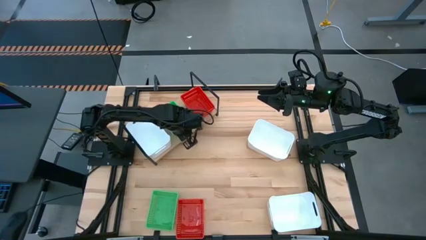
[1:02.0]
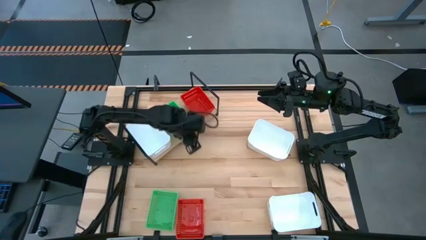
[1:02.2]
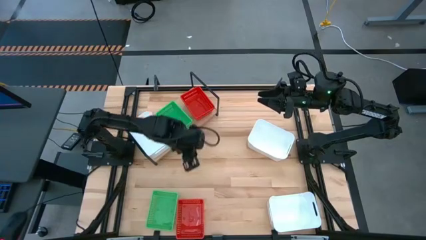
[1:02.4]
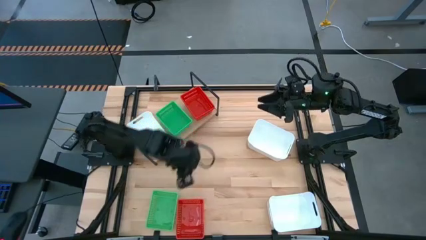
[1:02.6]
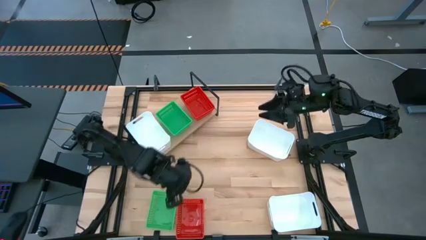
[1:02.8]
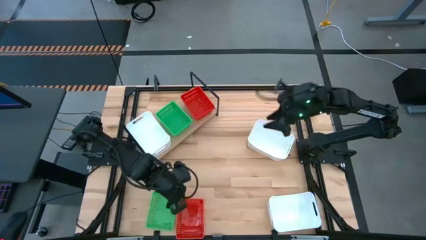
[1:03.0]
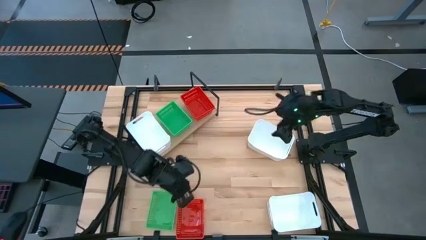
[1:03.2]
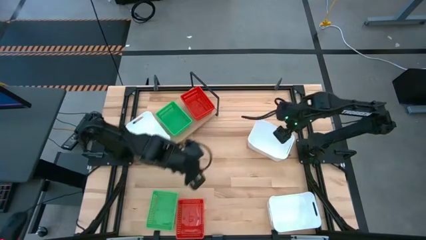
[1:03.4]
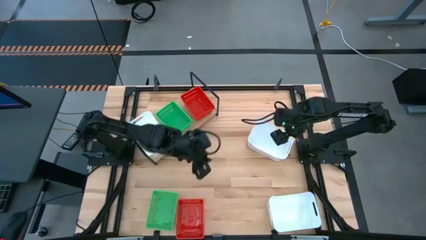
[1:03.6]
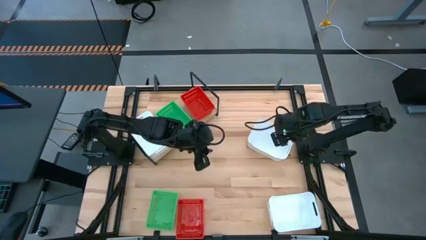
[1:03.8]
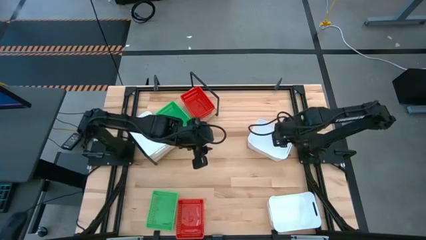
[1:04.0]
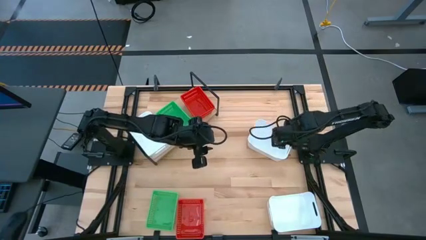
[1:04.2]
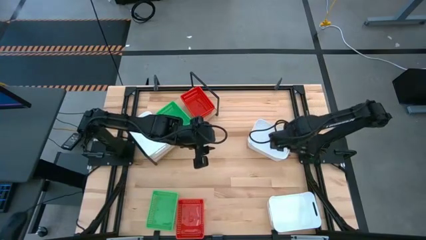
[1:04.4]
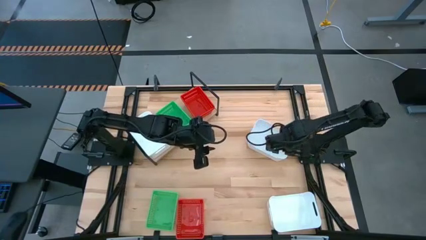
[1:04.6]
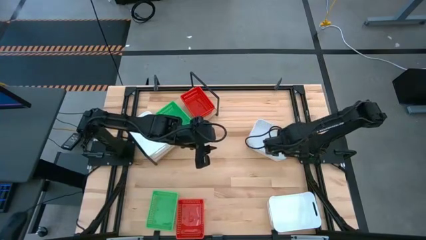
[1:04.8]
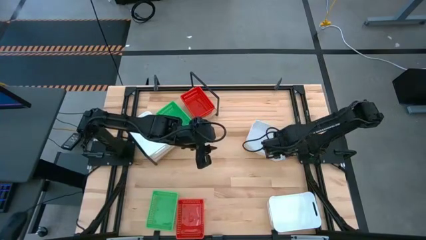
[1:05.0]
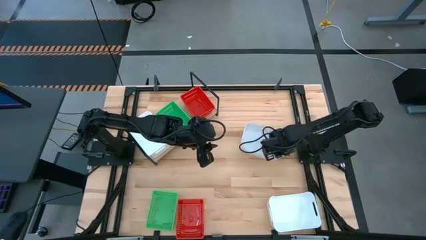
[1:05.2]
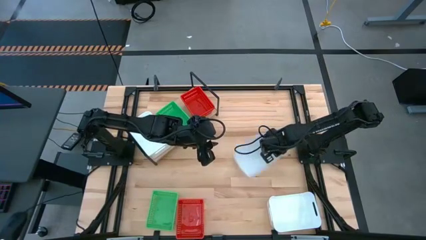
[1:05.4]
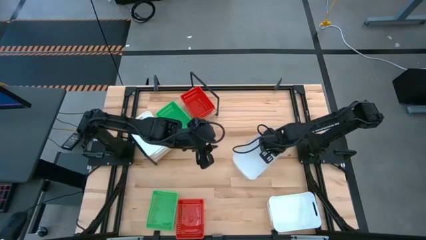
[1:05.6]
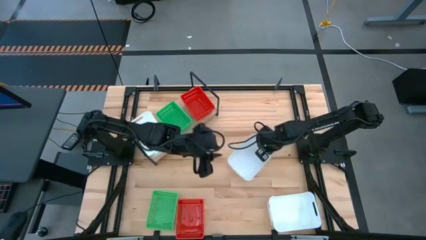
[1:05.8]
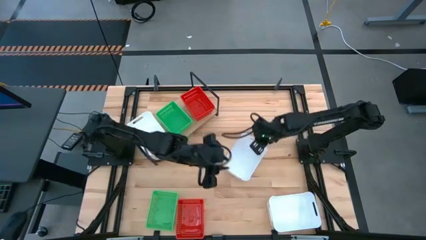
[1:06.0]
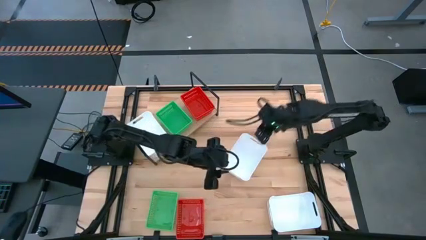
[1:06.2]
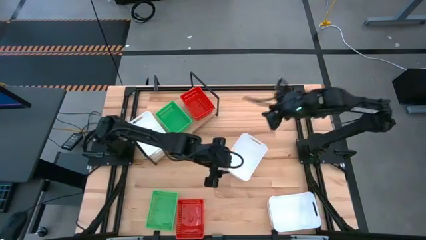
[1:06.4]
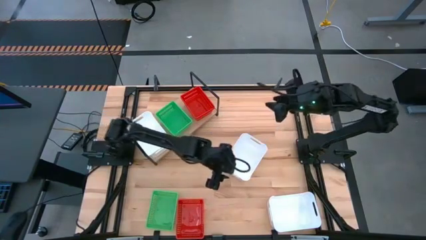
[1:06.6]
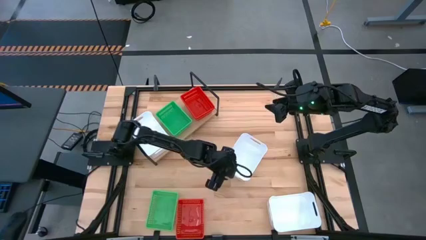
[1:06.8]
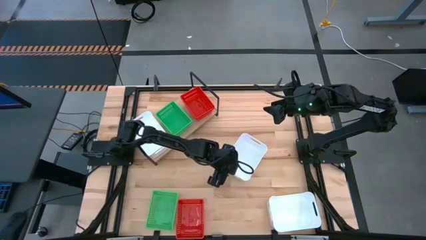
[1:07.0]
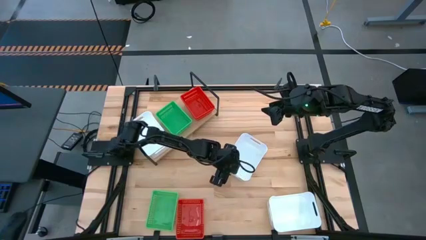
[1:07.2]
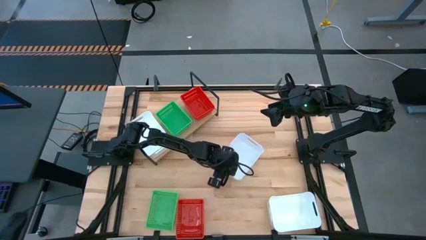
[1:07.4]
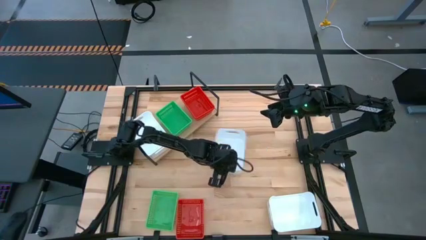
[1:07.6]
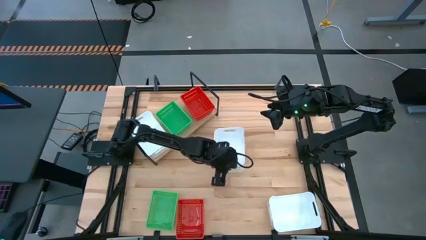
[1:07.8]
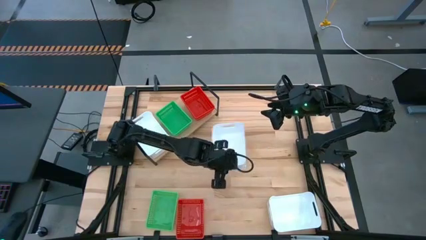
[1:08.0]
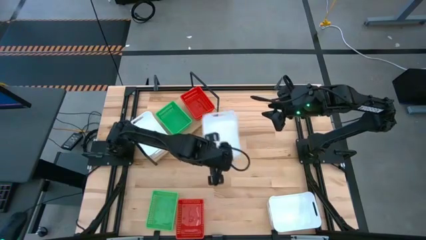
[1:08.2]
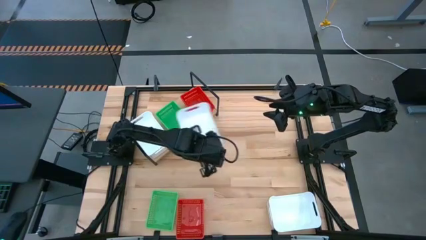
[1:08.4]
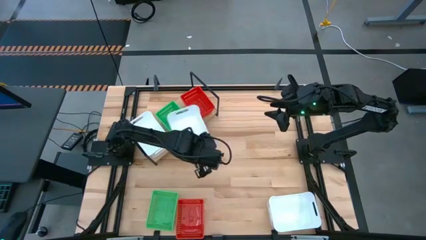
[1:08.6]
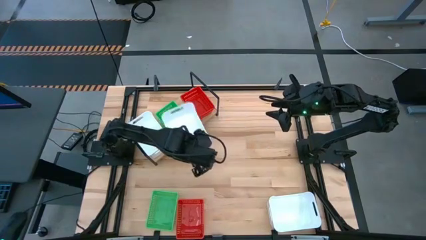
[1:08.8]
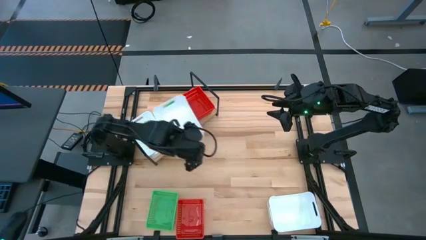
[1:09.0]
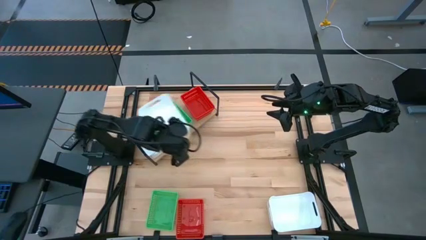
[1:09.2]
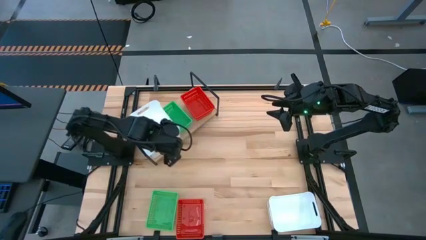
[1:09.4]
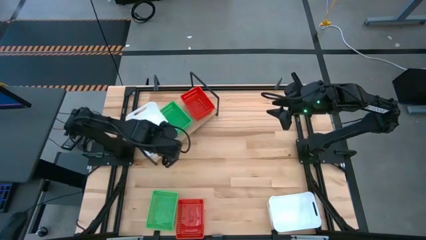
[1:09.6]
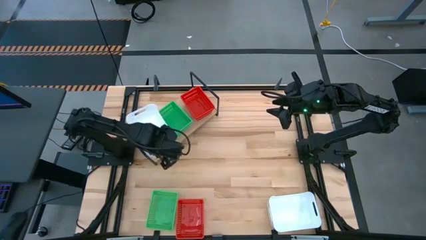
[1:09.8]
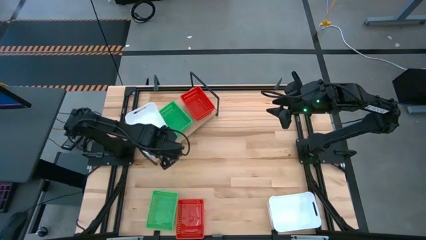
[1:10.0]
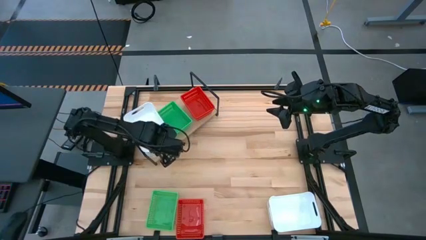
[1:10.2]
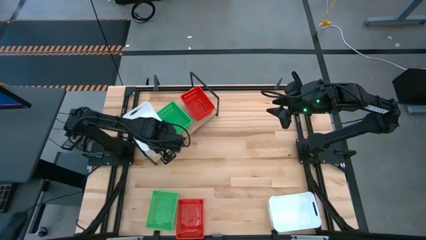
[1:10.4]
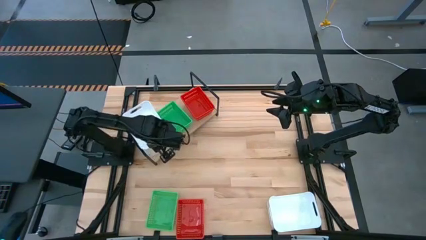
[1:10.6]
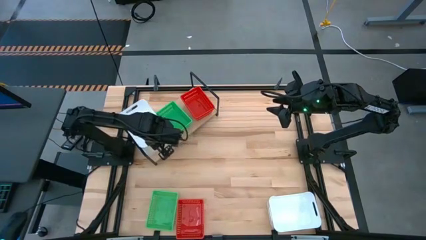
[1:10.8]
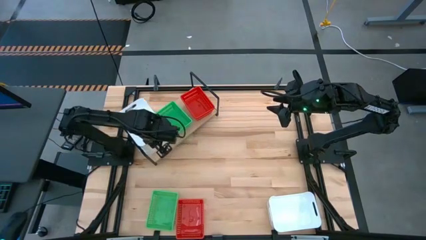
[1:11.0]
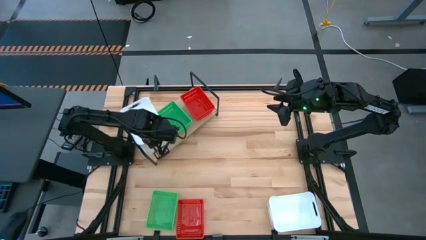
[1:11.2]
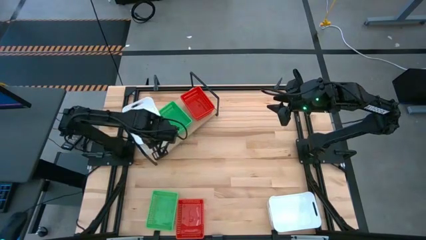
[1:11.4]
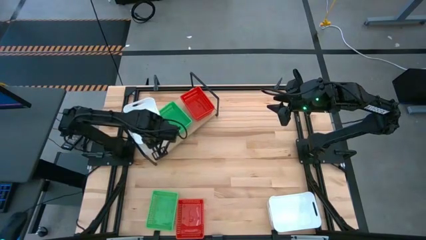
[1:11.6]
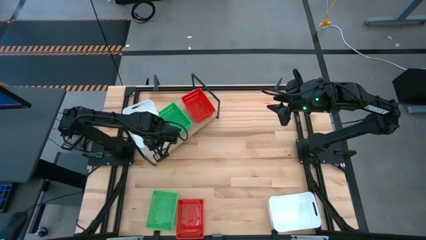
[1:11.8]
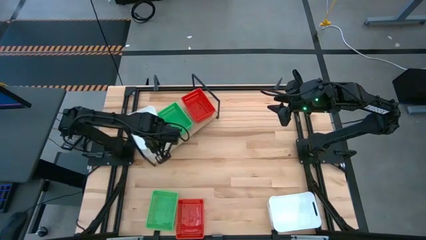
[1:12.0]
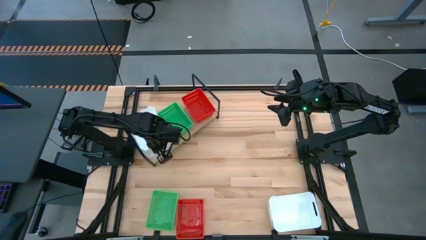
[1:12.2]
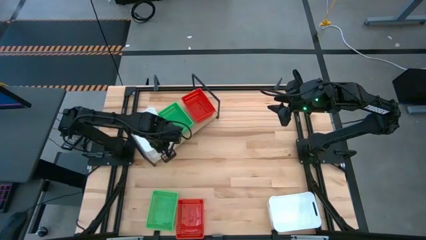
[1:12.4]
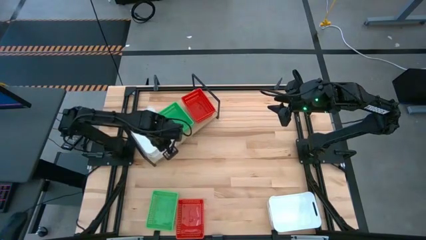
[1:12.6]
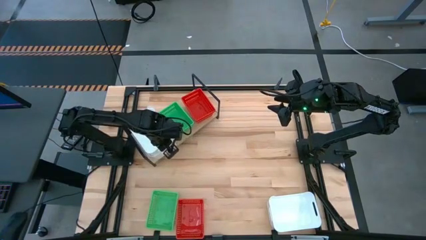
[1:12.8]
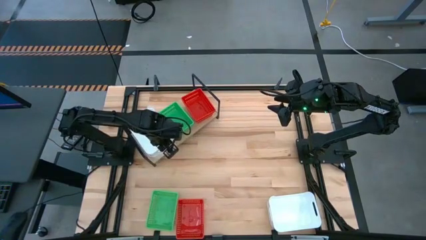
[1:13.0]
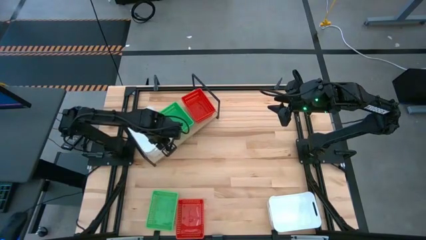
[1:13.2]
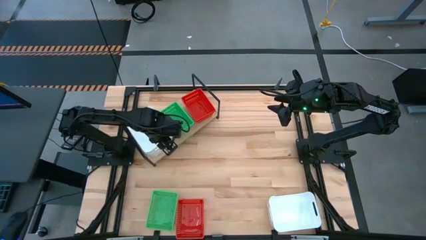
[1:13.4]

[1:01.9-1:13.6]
Task: Stack baskets on shelf by color
Stack the top white bin on top of the white bin on the shelf

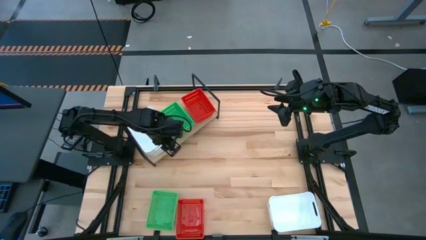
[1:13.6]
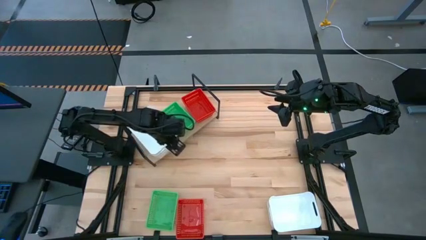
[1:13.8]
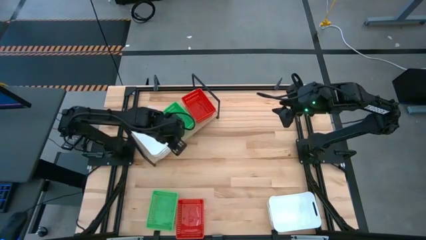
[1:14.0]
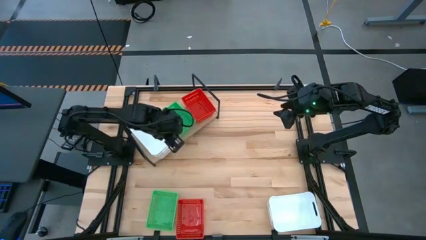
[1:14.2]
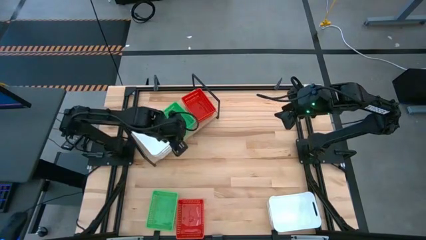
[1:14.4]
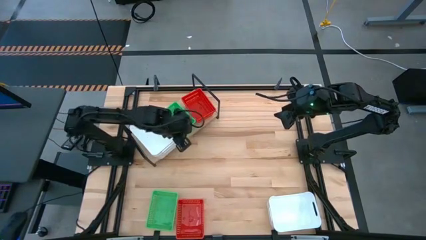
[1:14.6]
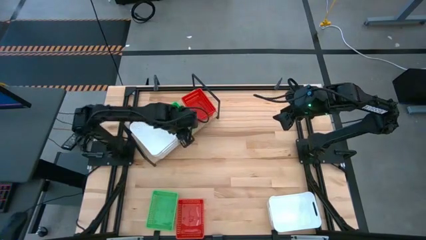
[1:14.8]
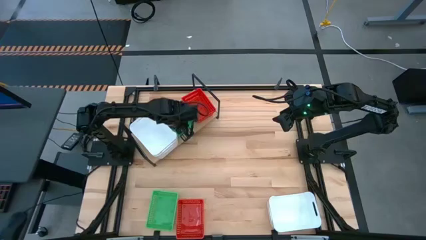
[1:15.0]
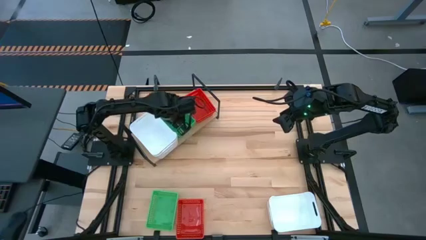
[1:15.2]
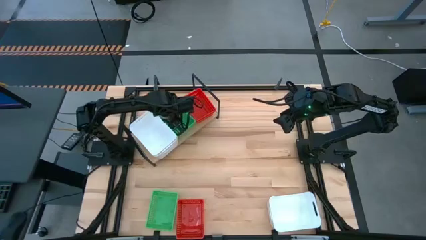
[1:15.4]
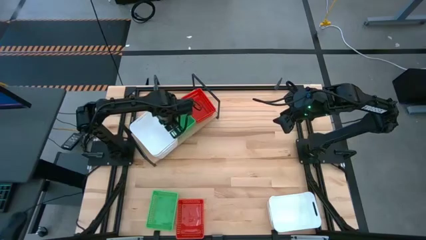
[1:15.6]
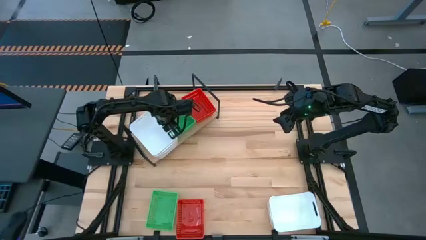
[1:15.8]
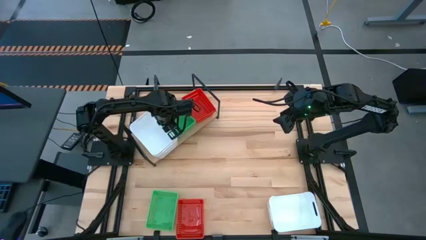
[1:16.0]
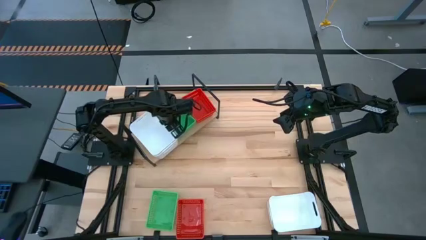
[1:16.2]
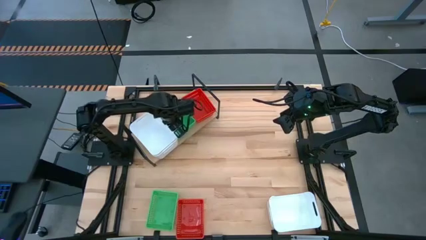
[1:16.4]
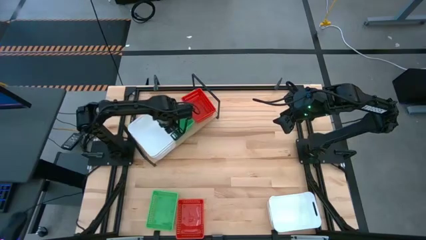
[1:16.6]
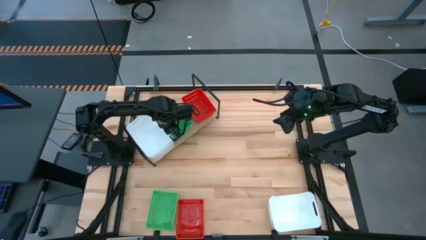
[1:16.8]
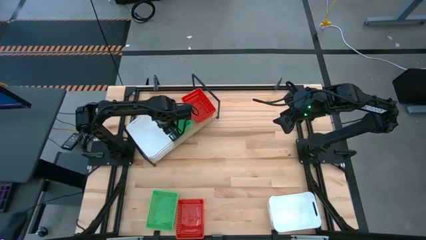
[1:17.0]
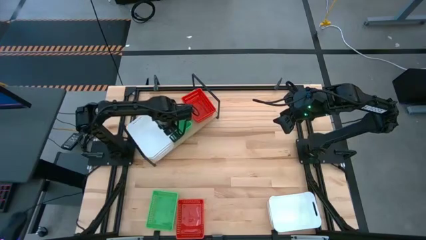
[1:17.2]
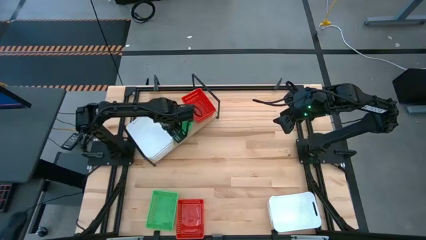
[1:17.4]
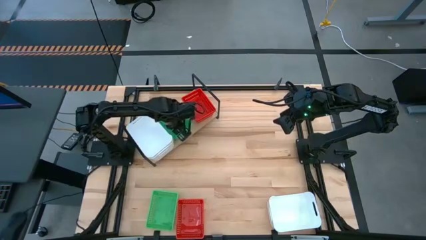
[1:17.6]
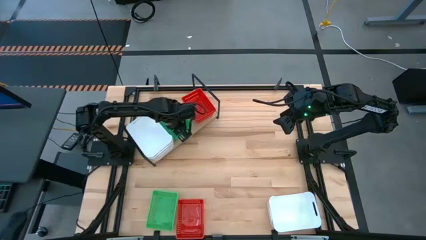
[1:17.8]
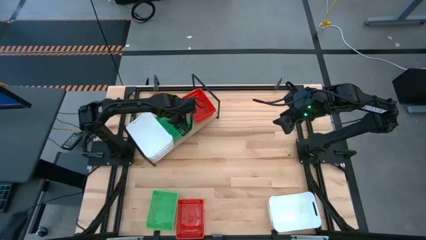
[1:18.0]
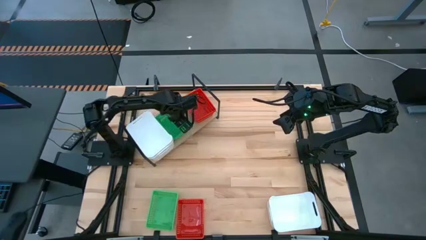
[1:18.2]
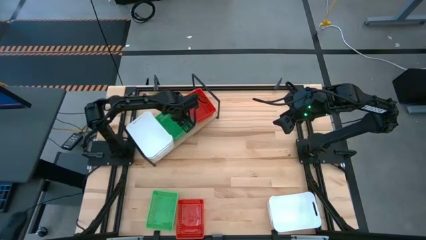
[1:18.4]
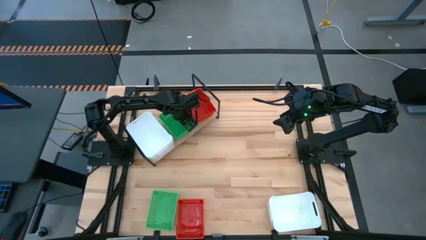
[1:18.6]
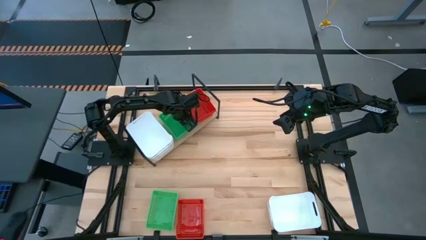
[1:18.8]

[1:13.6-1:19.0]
Adjust the stack of green bins on the shelf
